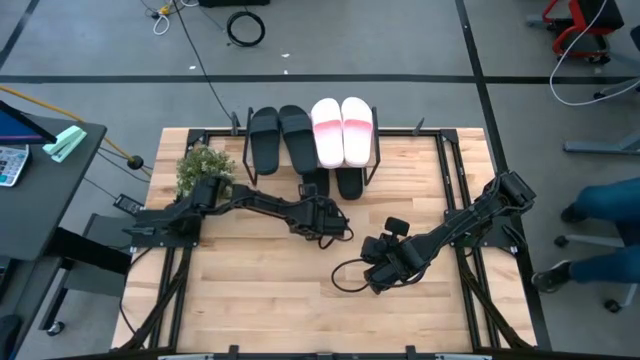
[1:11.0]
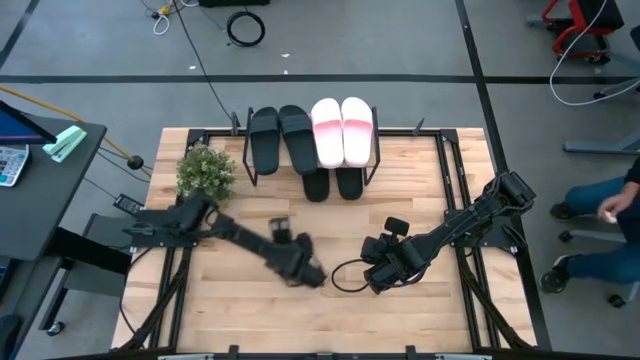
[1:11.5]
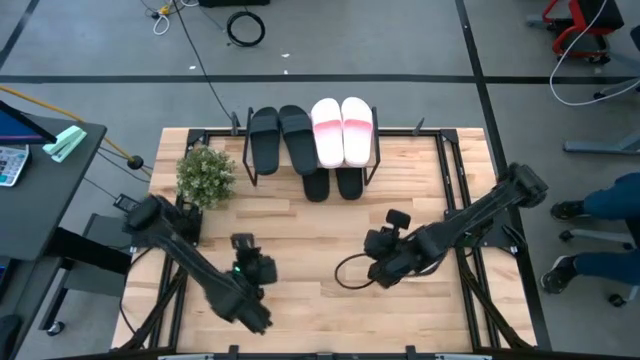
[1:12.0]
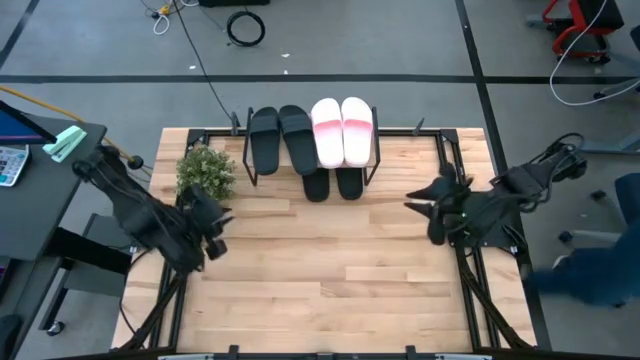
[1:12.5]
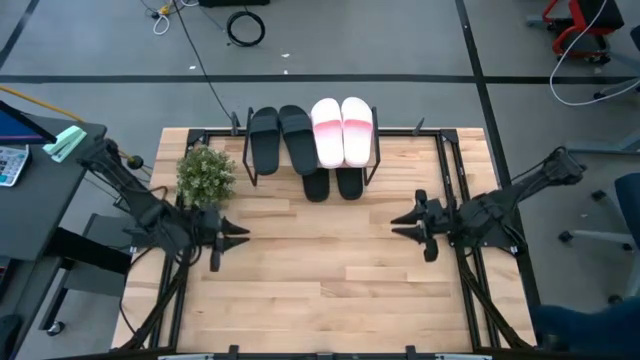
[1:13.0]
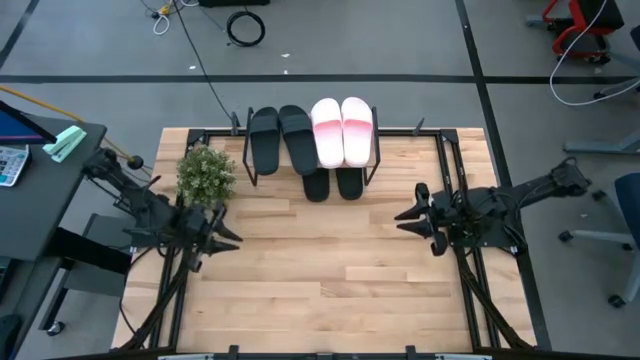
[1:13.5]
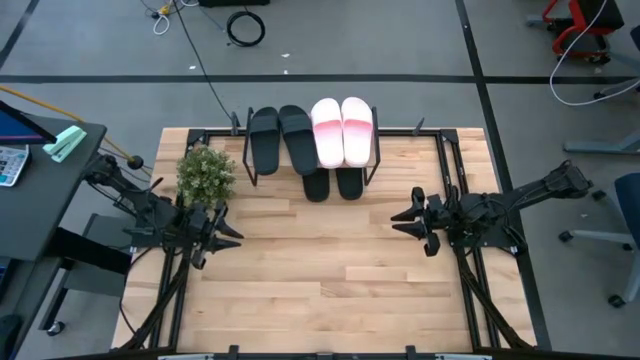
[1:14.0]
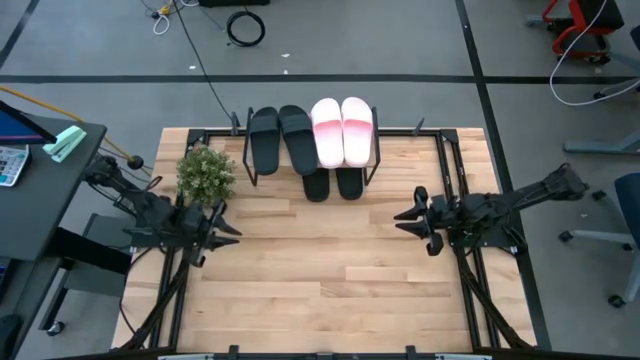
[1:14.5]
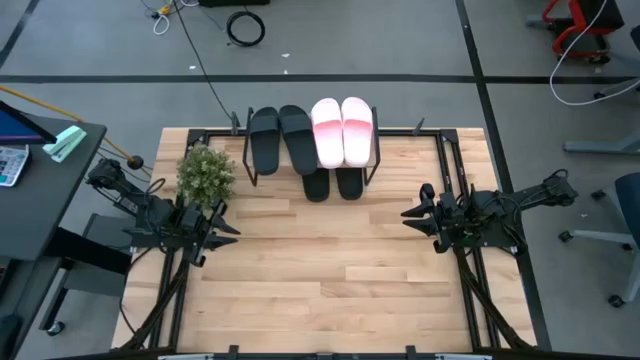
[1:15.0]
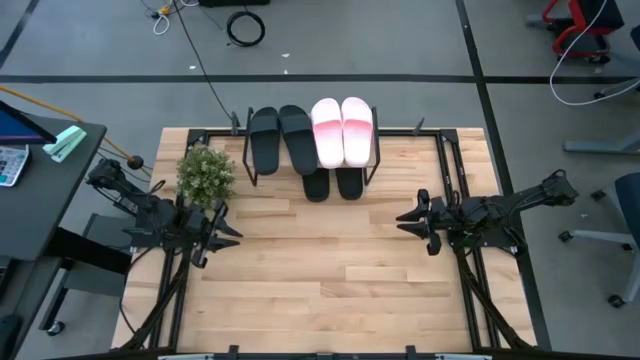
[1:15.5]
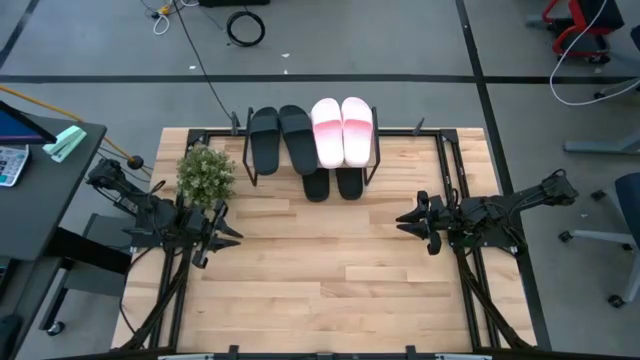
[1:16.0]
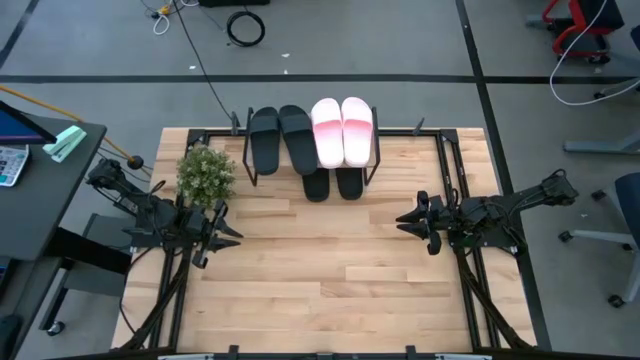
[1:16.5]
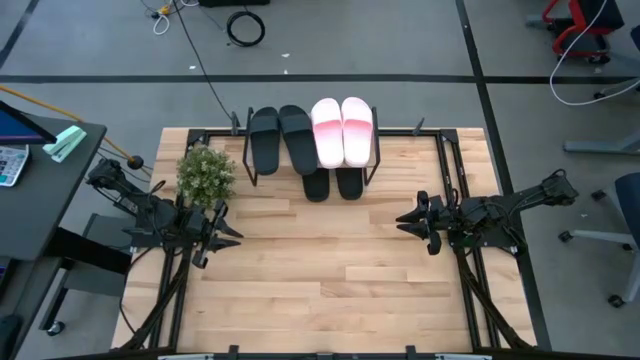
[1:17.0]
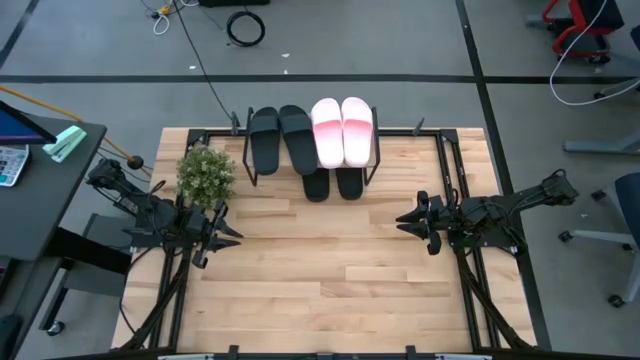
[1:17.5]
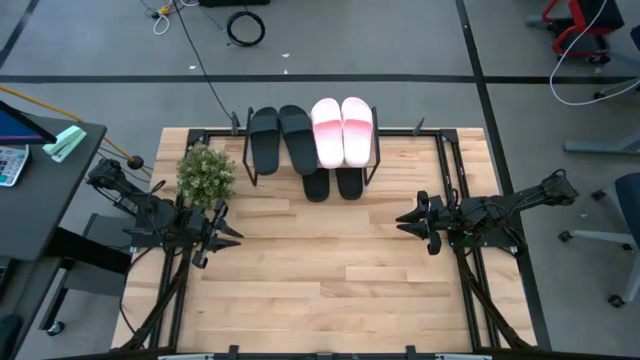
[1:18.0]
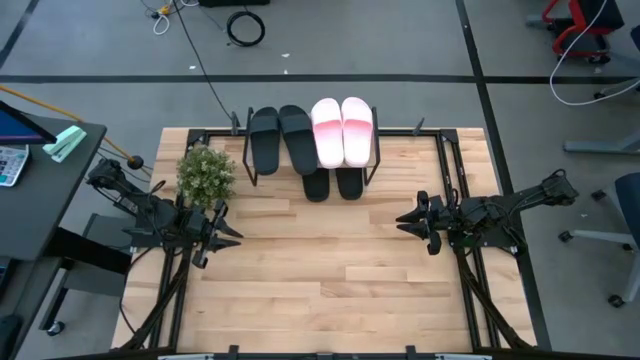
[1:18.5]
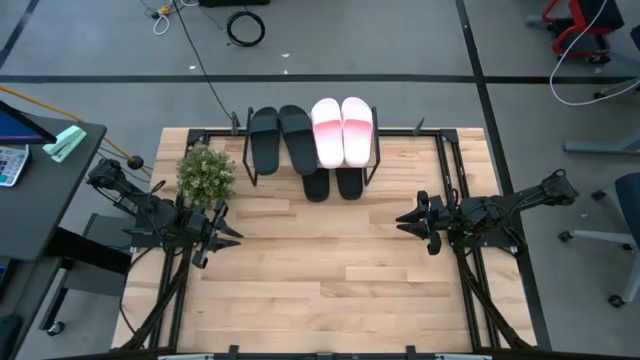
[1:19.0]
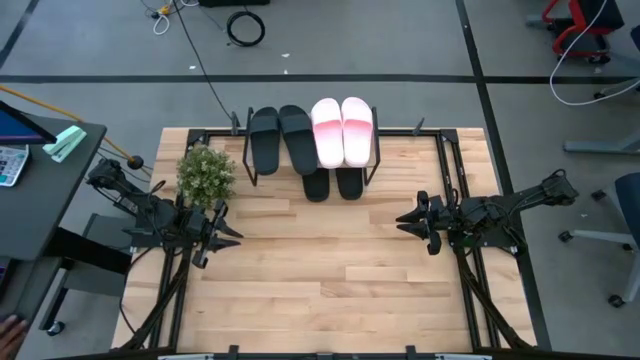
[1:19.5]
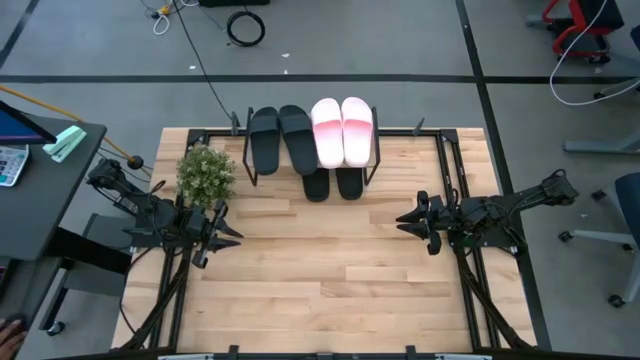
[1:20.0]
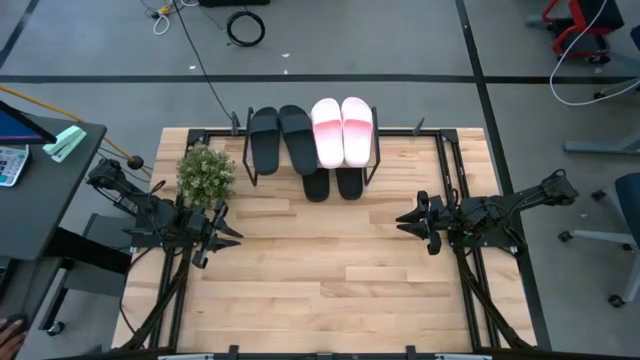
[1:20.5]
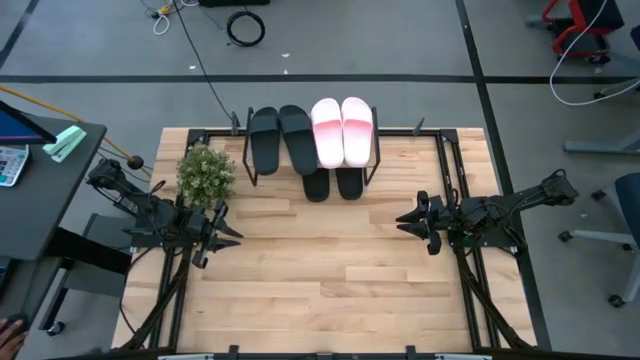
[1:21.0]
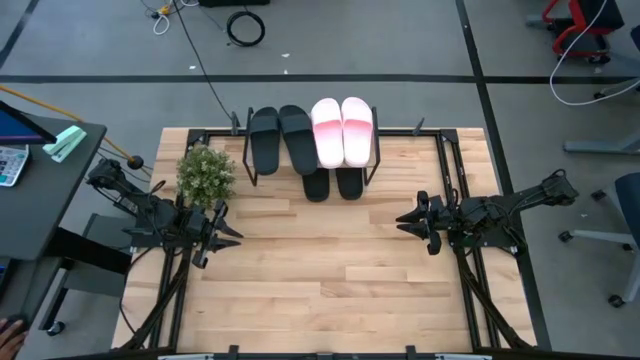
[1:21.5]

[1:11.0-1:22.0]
Task: Pick and place slides into the shelf
Return to Home Position

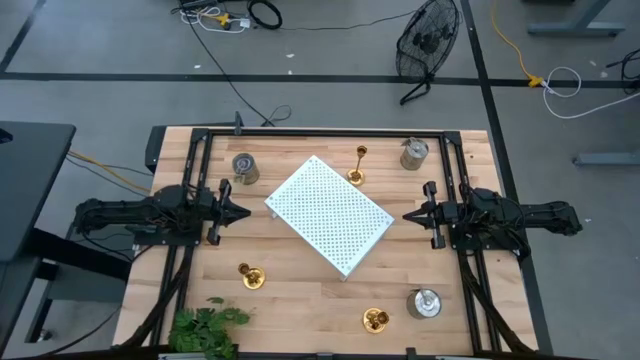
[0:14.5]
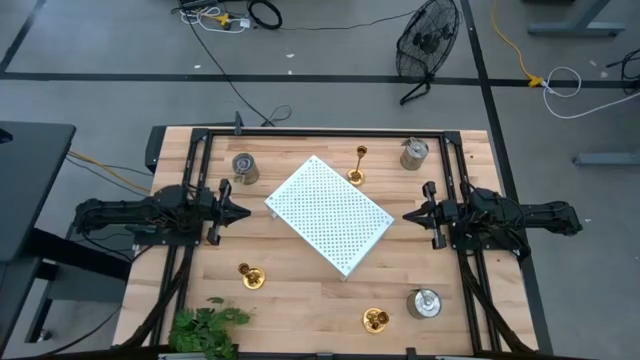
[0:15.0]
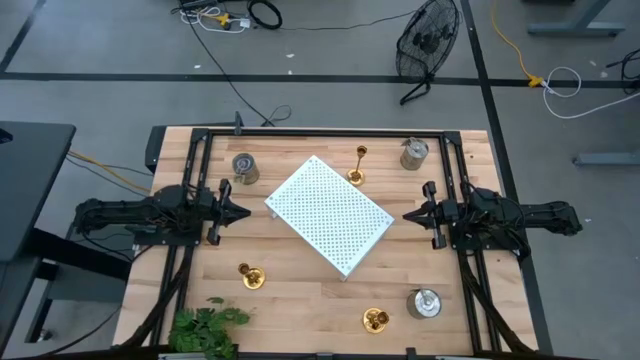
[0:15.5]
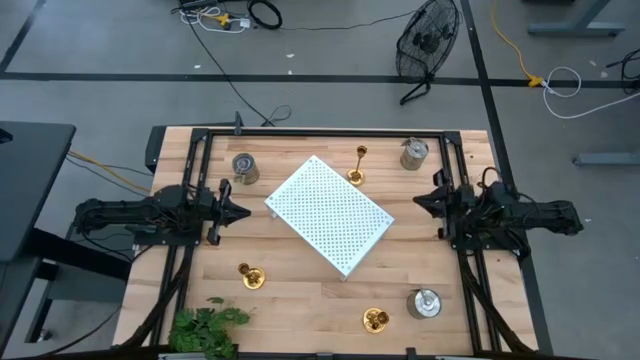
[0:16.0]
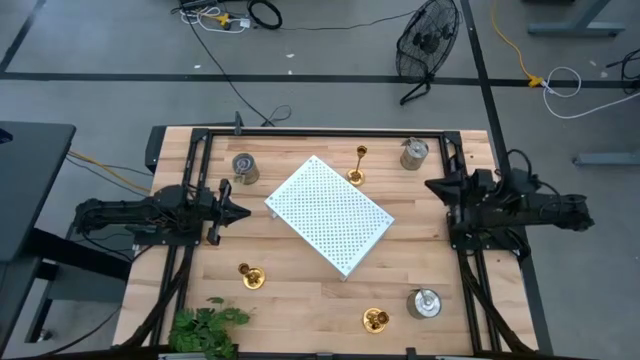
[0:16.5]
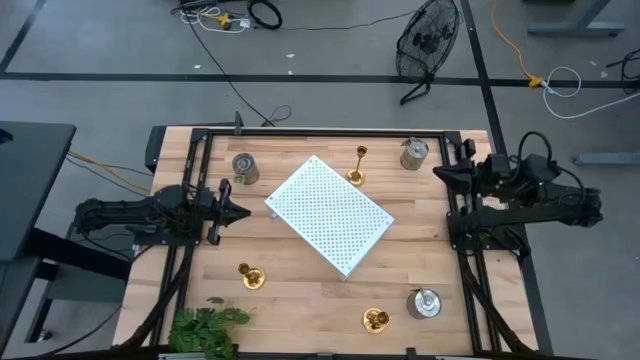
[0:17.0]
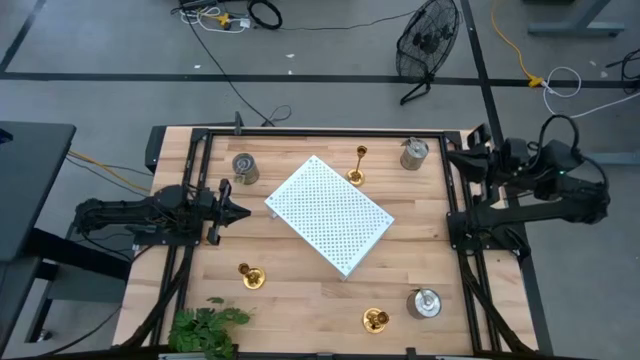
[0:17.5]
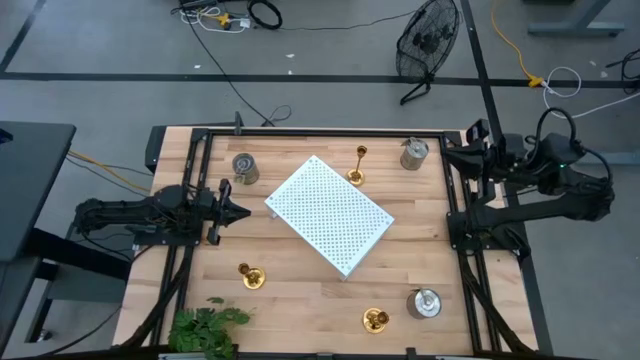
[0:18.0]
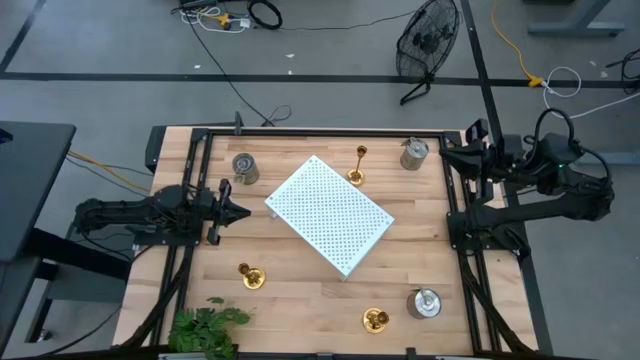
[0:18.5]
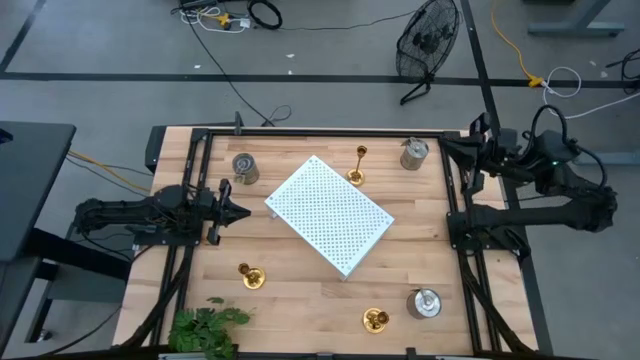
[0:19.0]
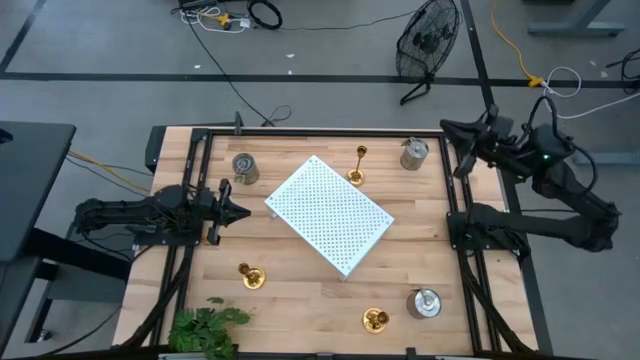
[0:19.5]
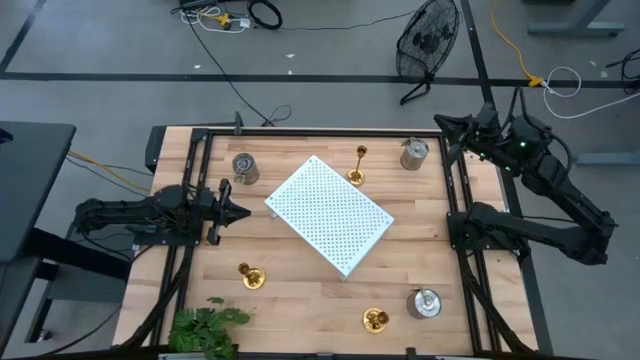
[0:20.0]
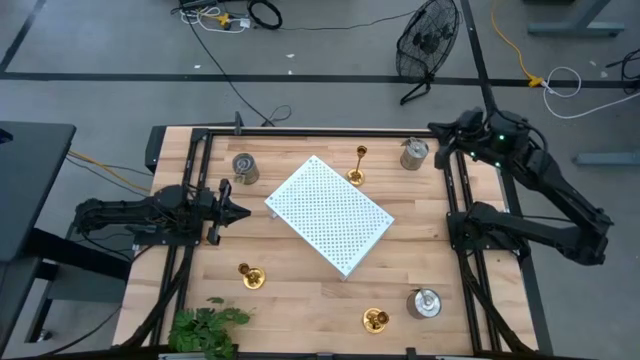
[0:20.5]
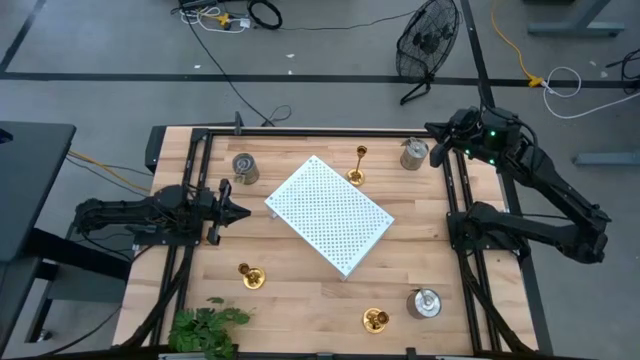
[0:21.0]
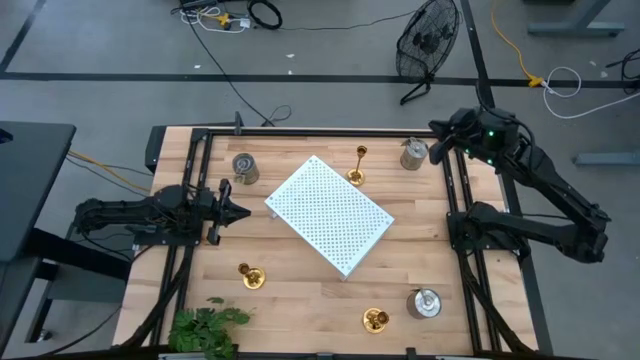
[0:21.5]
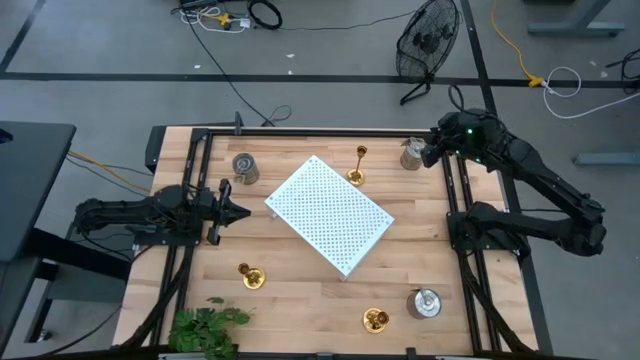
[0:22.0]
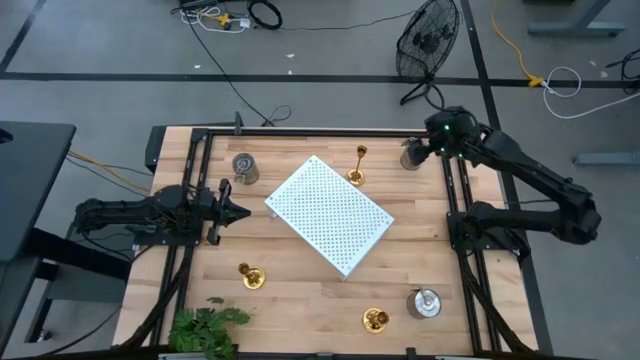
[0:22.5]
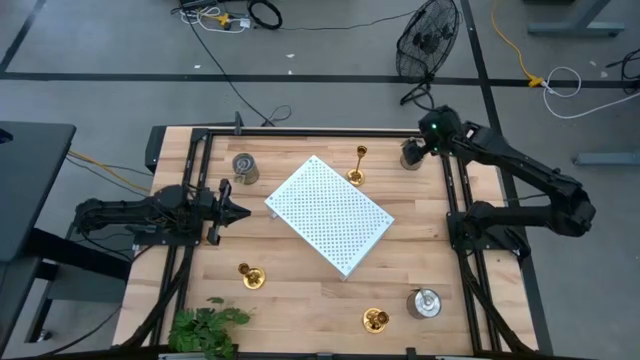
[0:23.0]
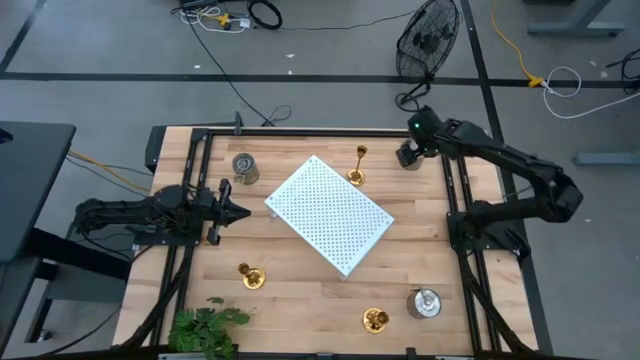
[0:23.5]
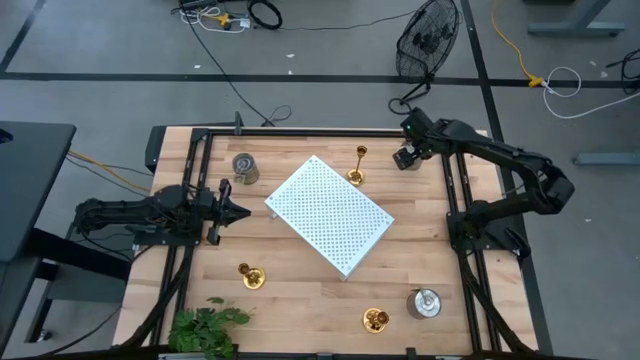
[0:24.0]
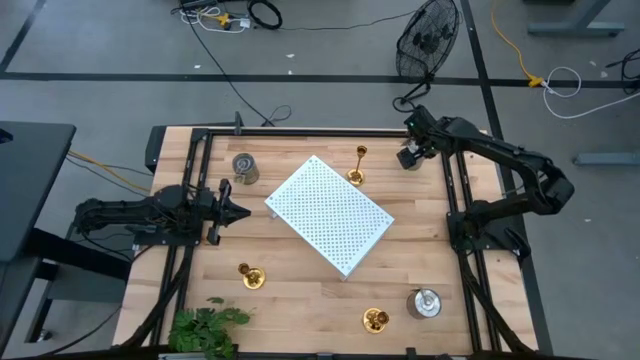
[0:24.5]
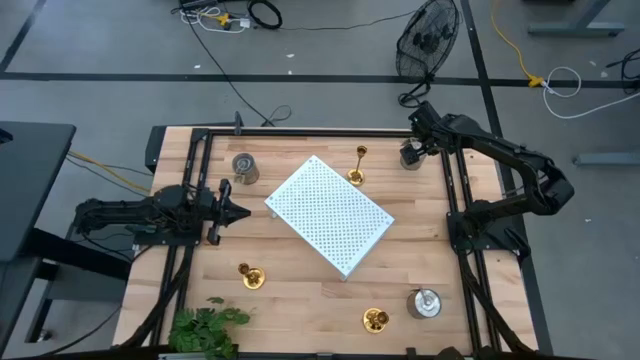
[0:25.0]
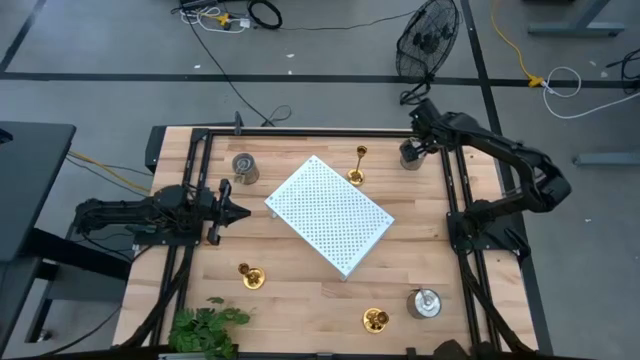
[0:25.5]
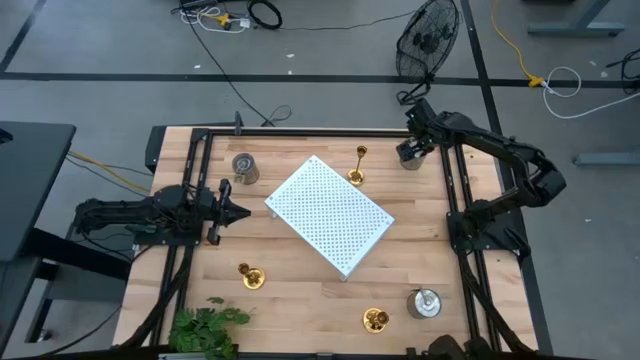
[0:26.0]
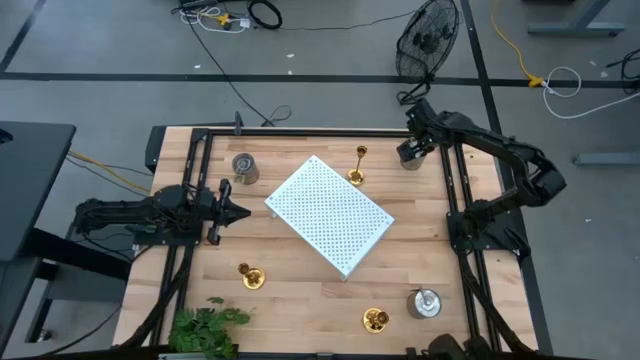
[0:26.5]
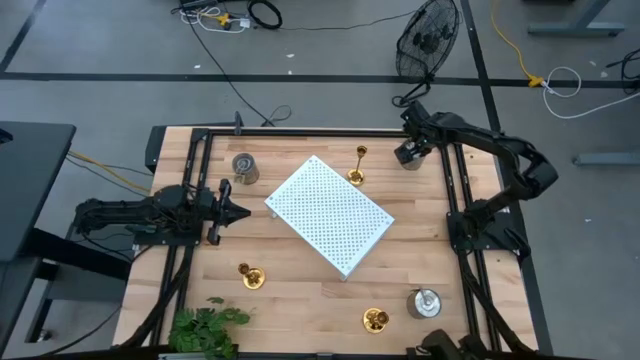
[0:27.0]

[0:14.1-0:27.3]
Task: Pick & Place candle stick holders
Put the top right scented candle on the shelf
